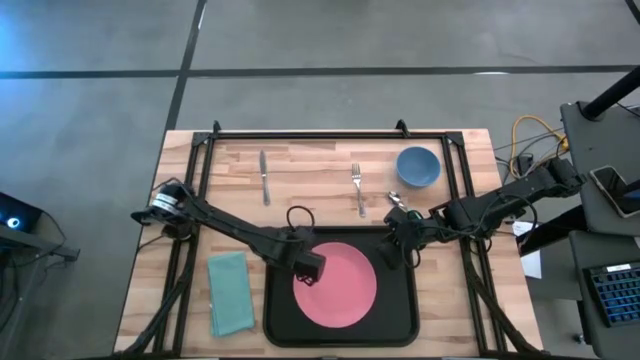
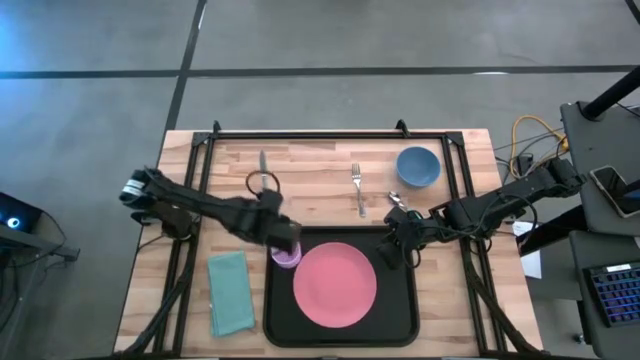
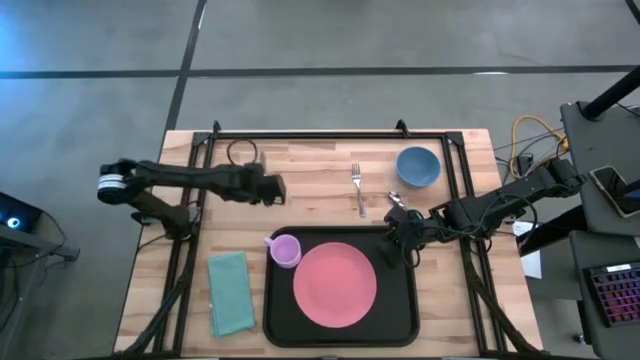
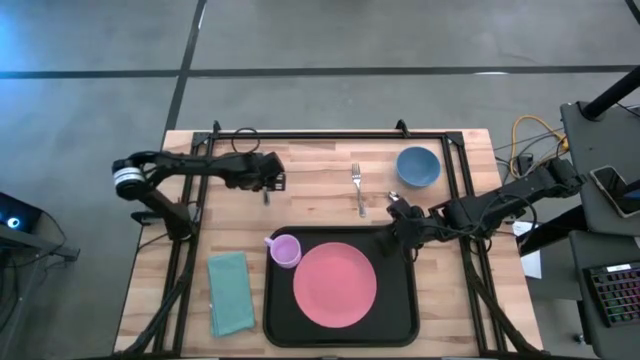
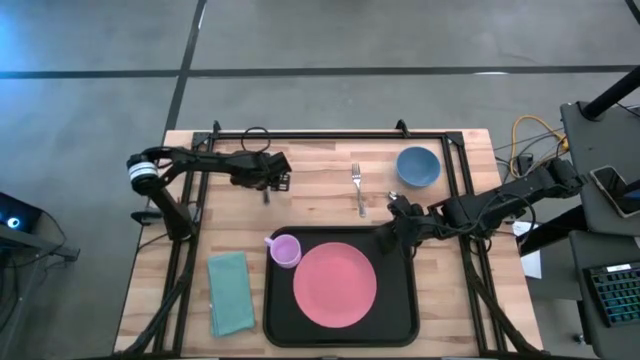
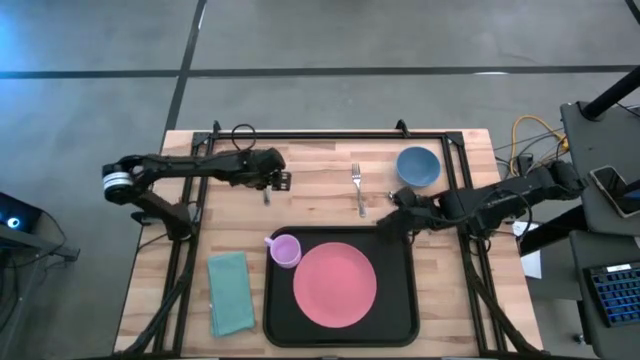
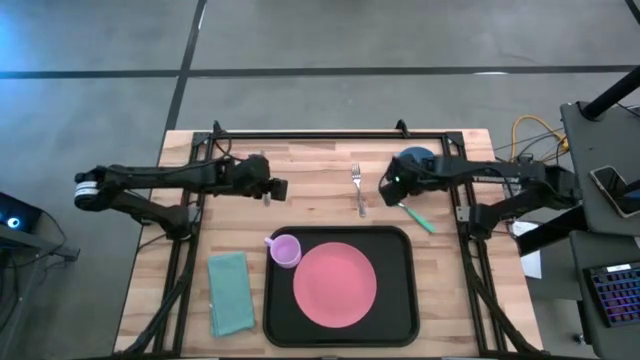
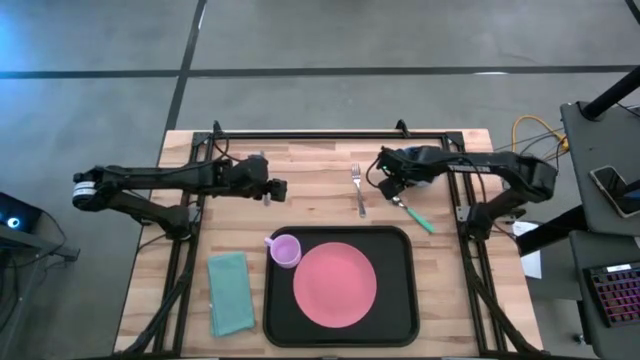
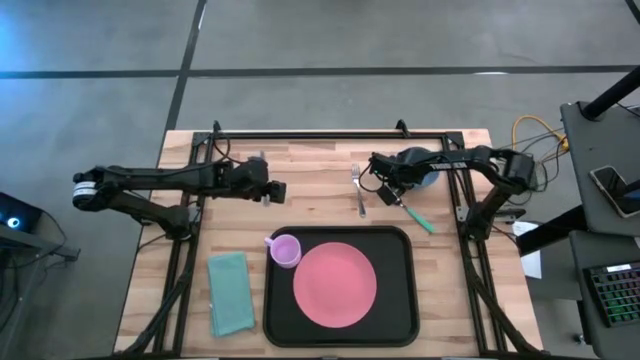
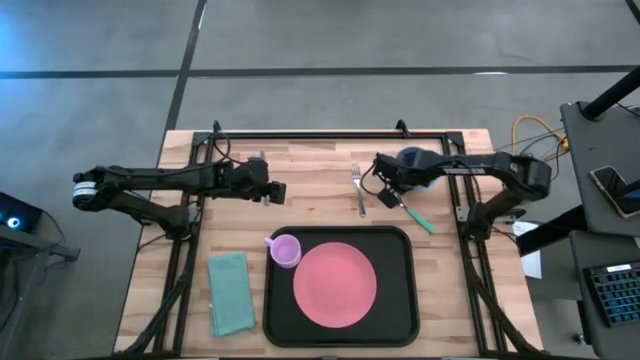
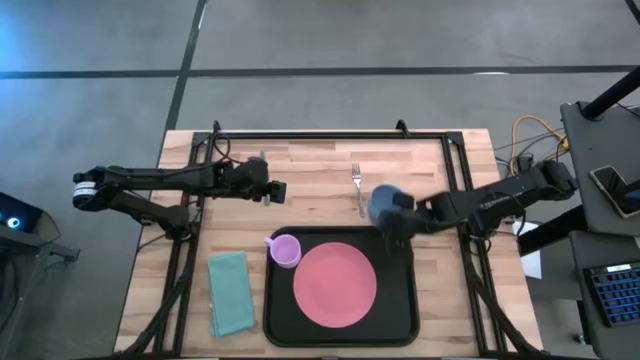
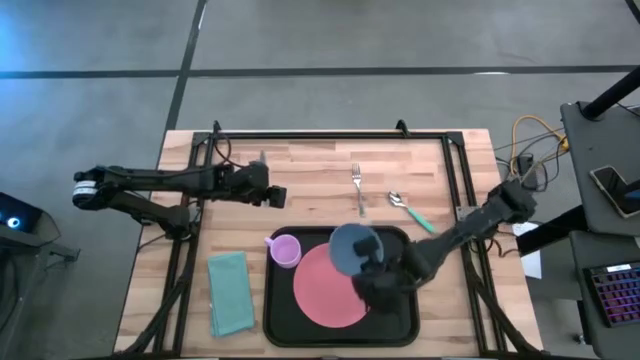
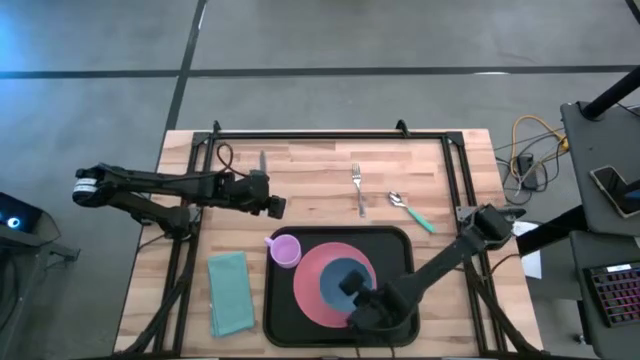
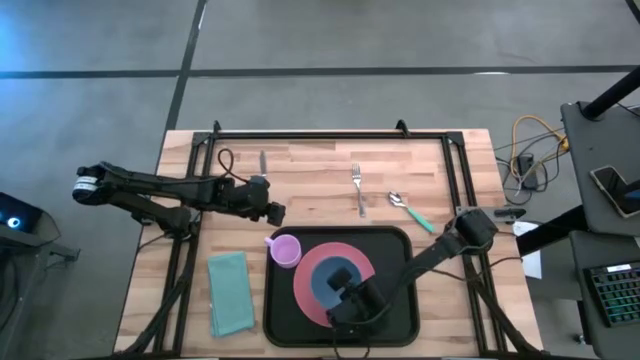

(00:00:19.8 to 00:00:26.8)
Task: Set up tray
Stack the blue bowl on top of the pink plate on the black tray

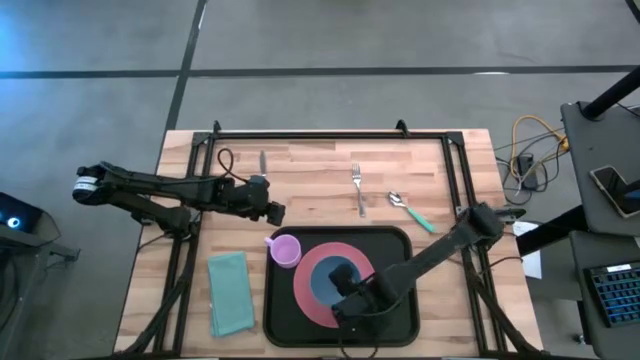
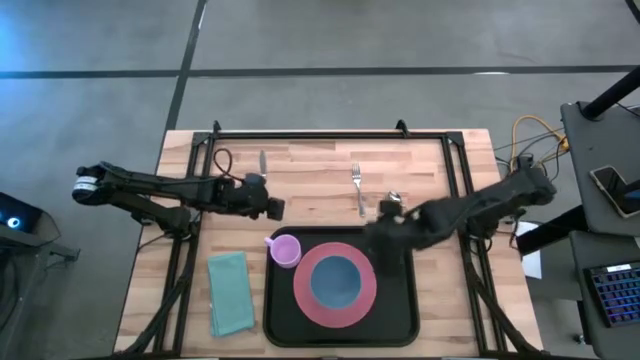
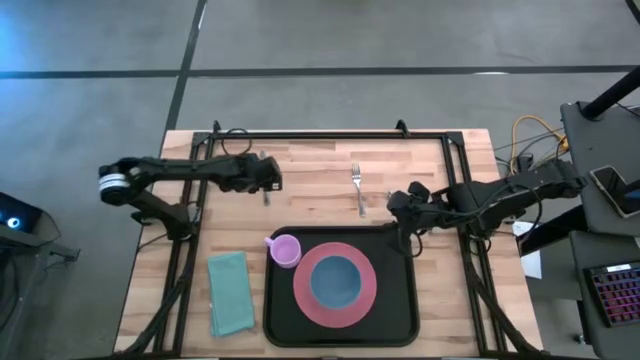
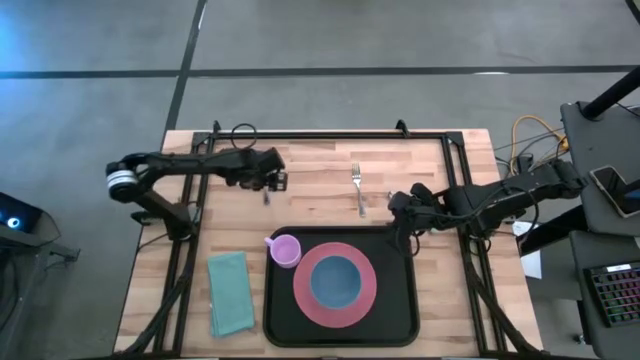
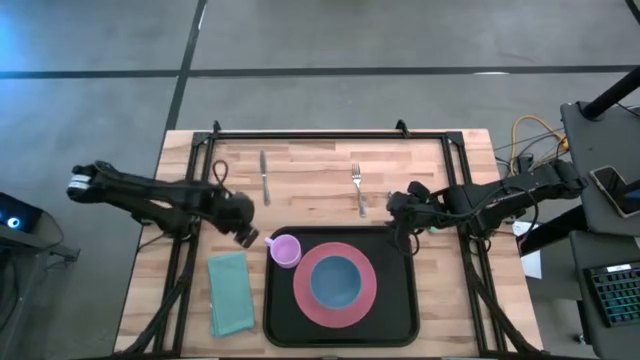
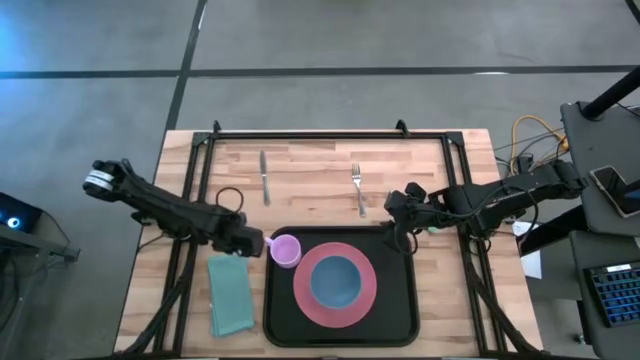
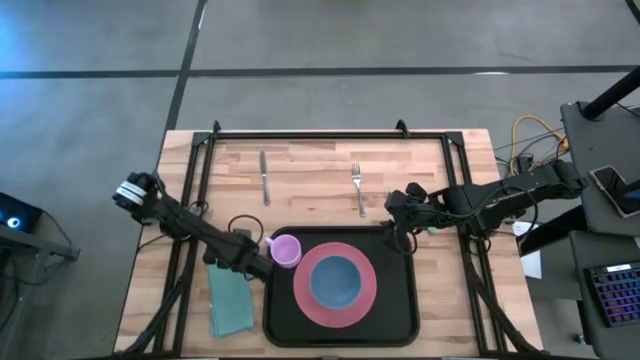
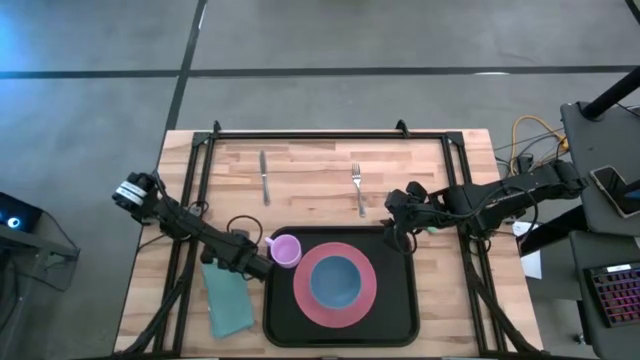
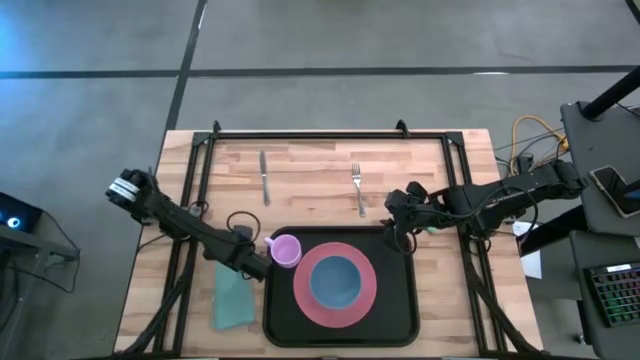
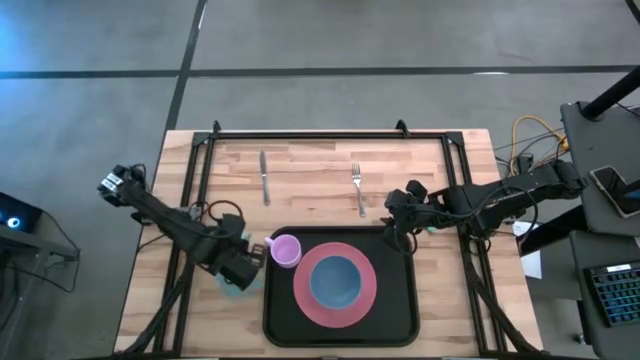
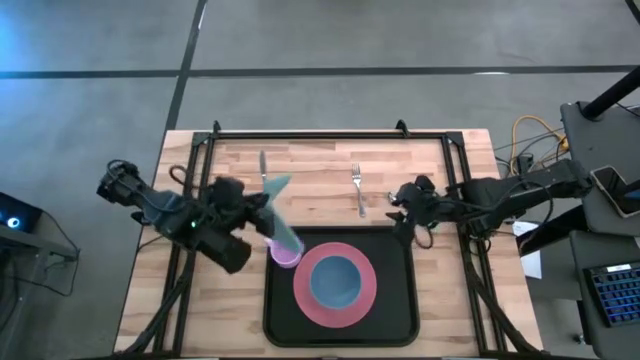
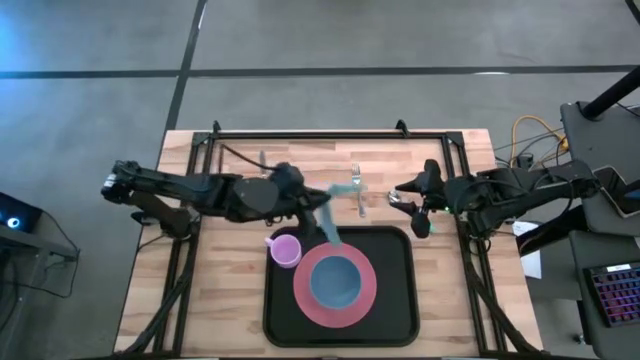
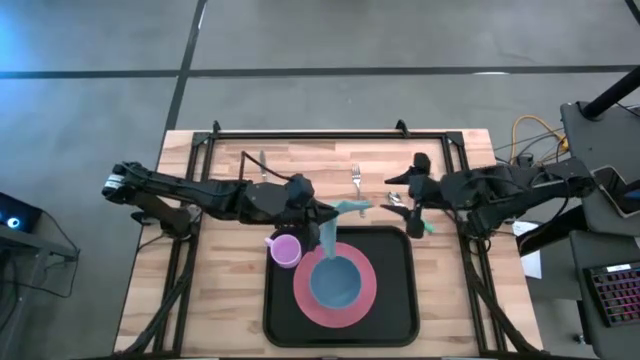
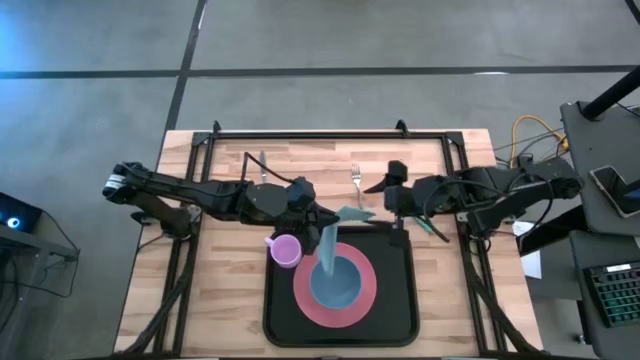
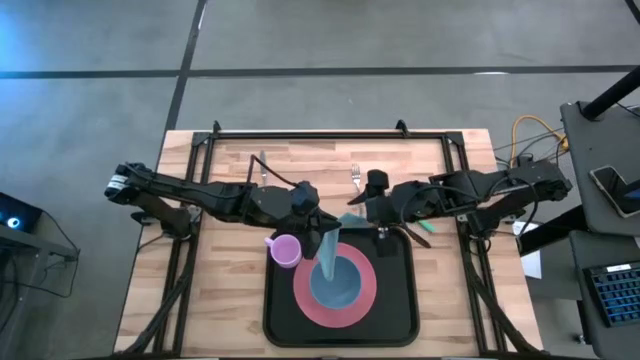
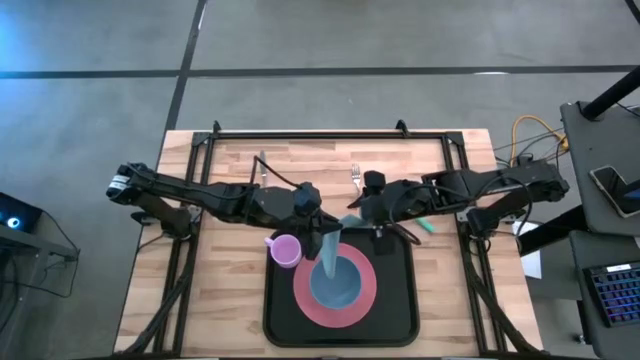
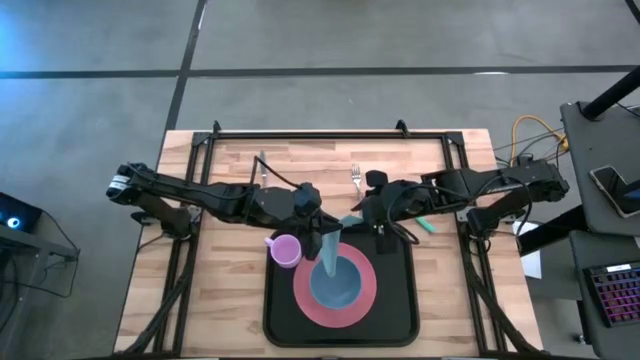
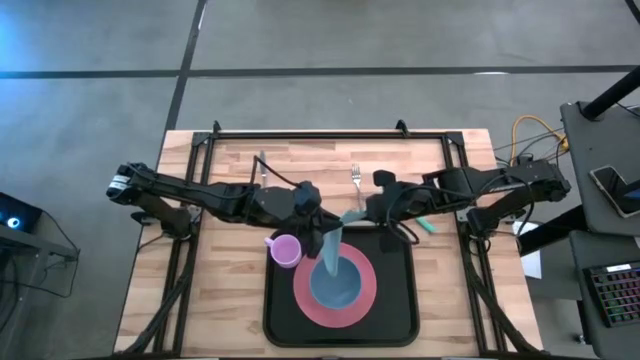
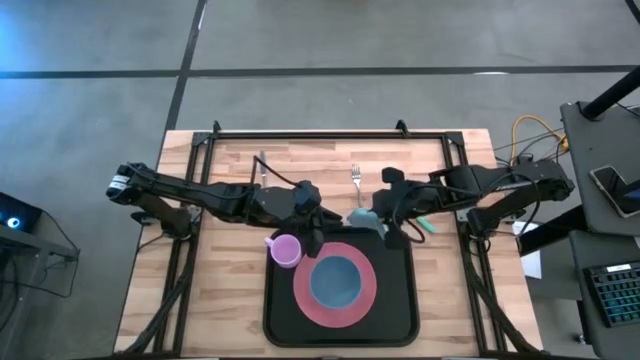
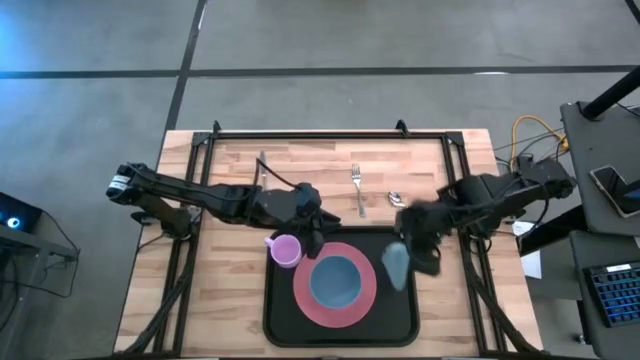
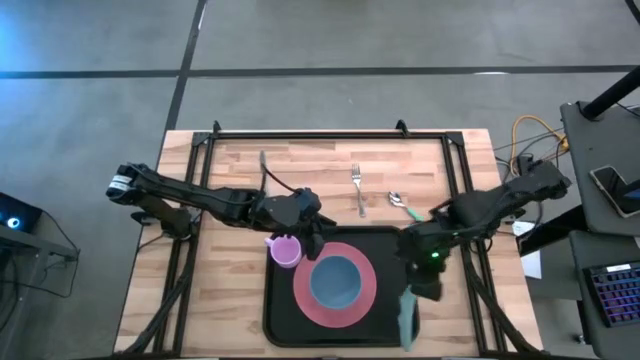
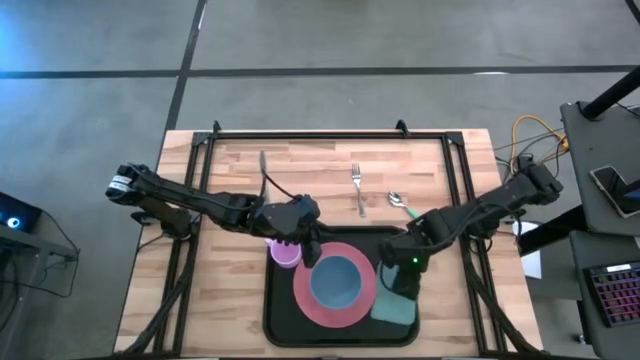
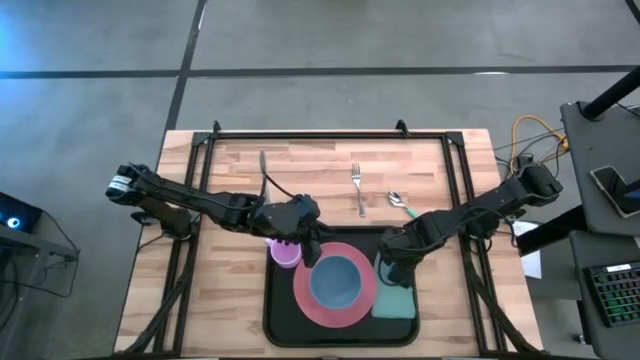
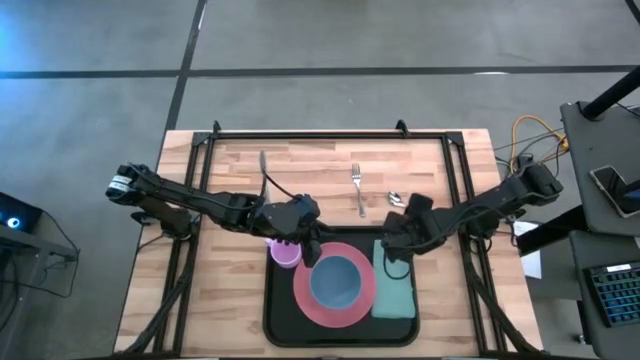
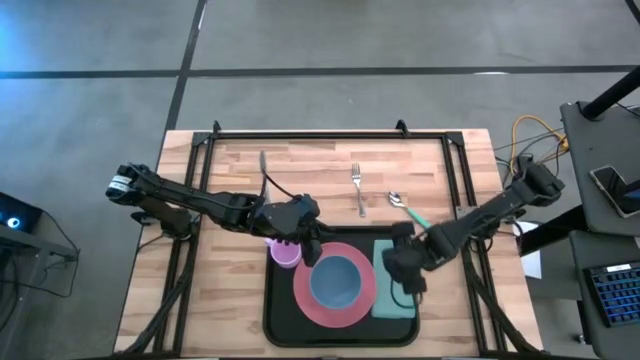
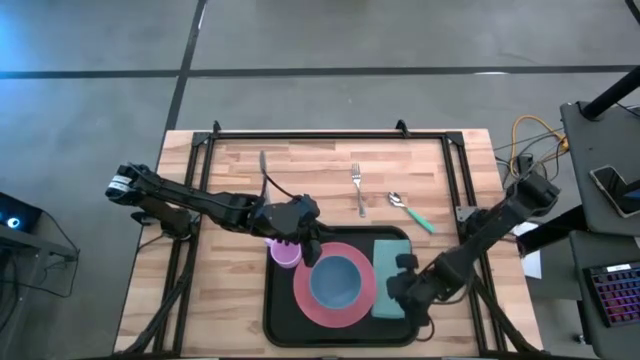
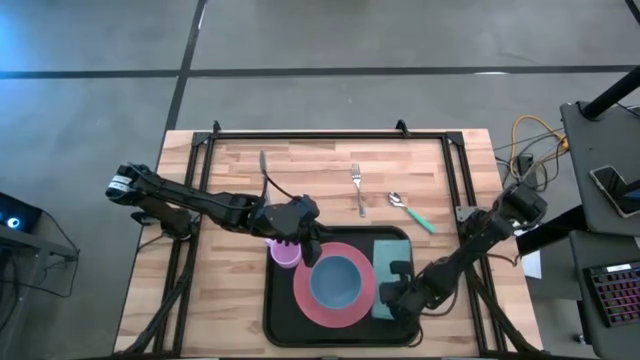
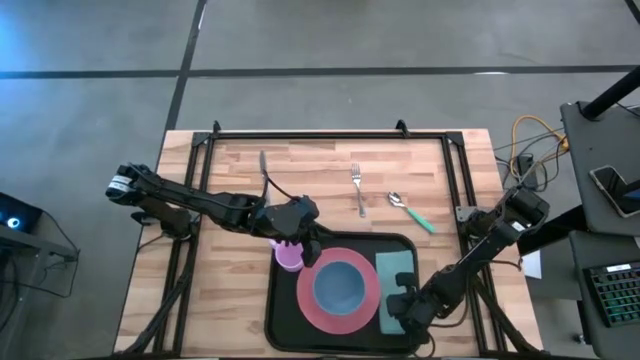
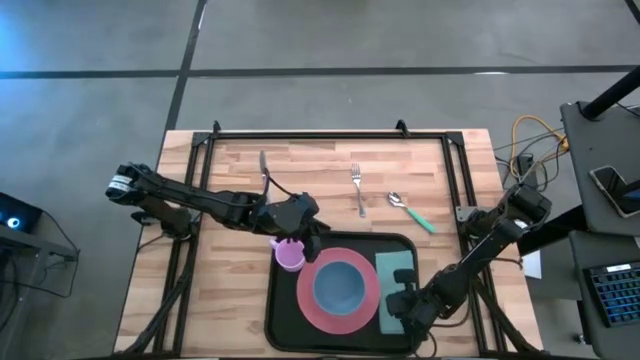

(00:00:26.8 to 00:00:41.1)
Put the blue napkin to the right of the pink plate on the black tray
